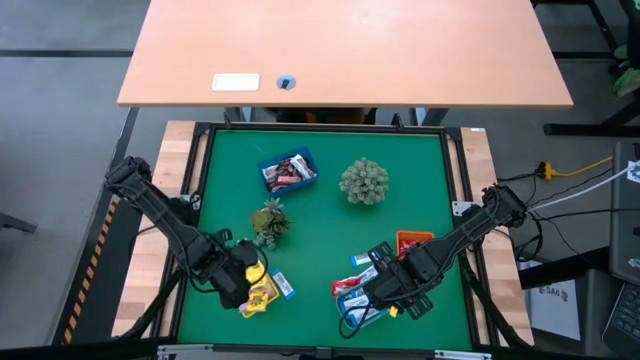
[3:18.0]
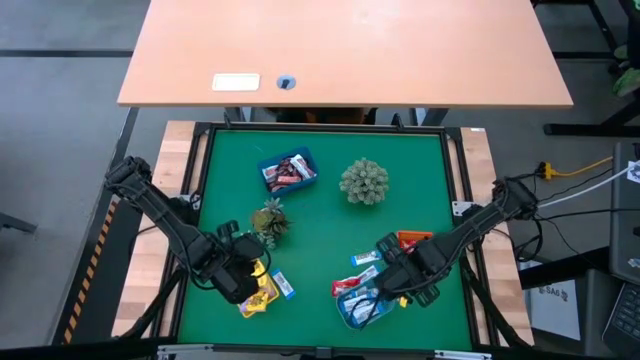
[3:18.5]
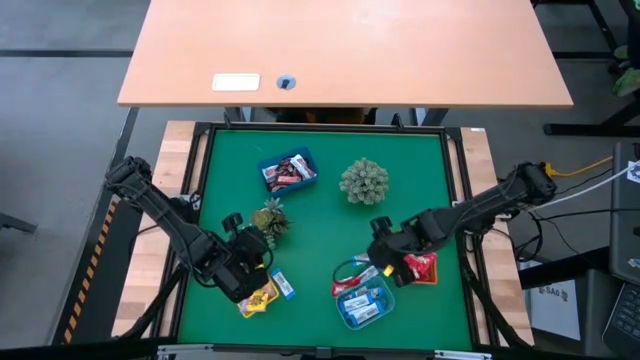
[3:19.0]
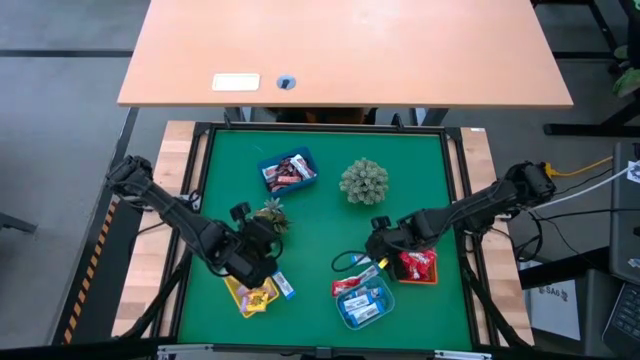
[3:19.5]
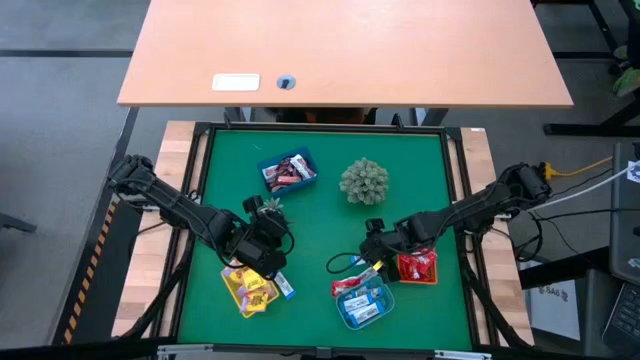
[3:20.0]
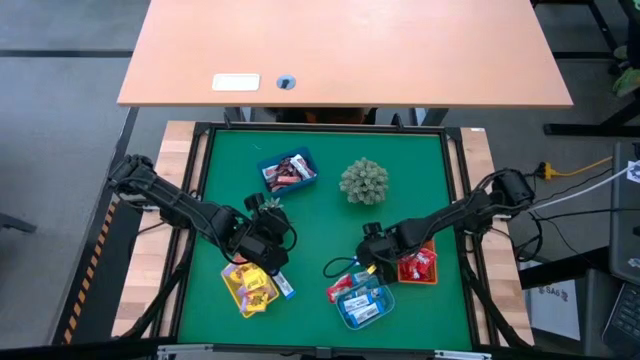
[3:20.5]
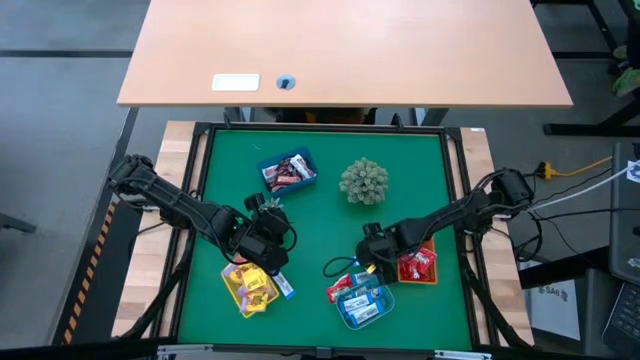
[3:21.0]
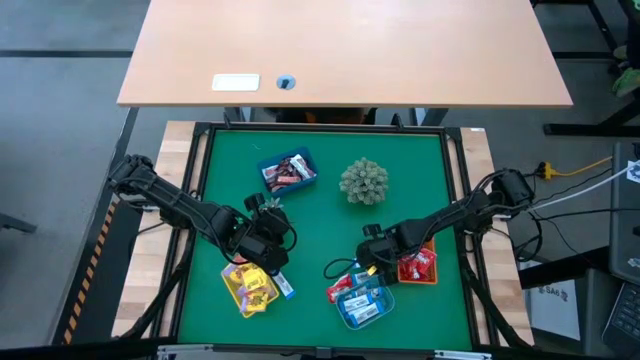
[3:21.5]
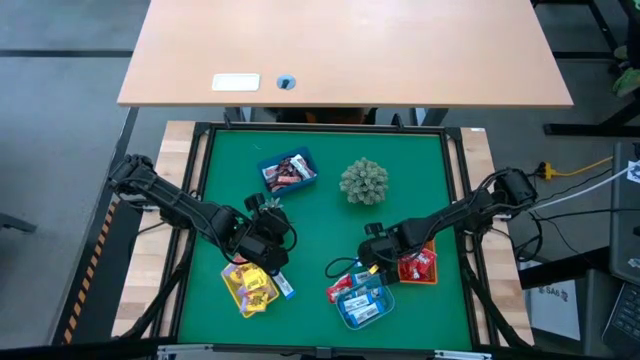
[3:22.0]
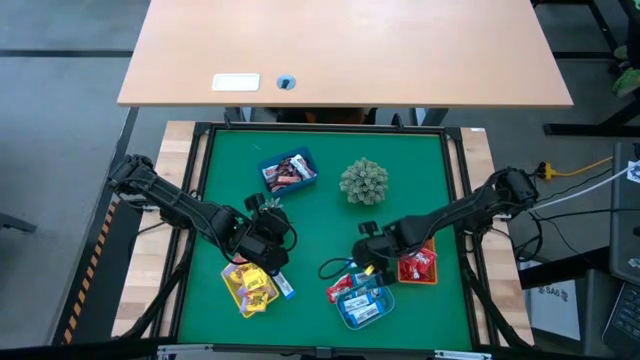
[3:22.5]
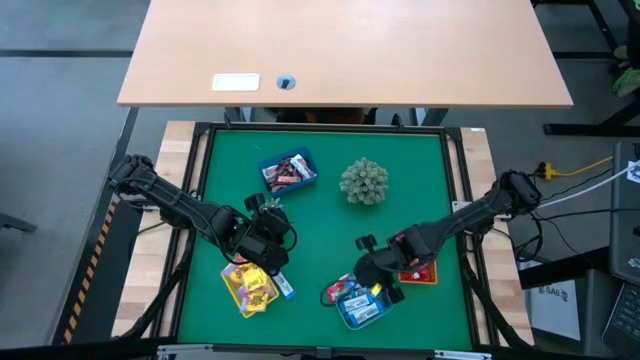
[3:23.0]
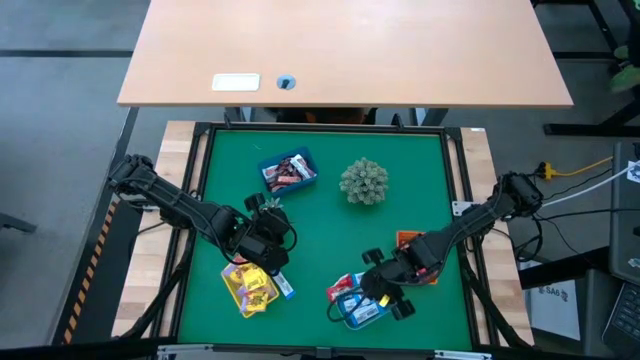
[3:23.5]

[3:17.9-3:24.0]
Task: Sort candy
Put the white-blue chocolate into the light blue bin

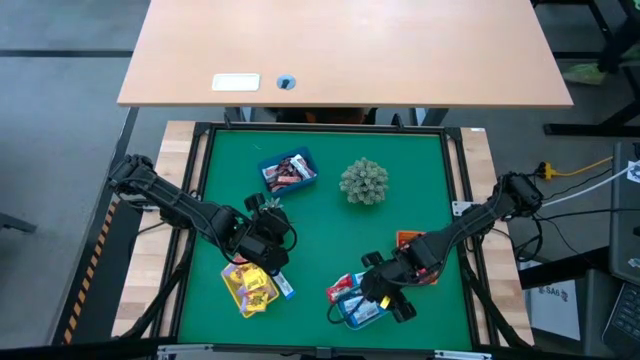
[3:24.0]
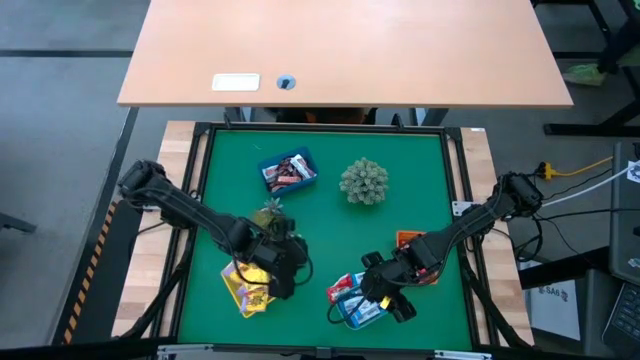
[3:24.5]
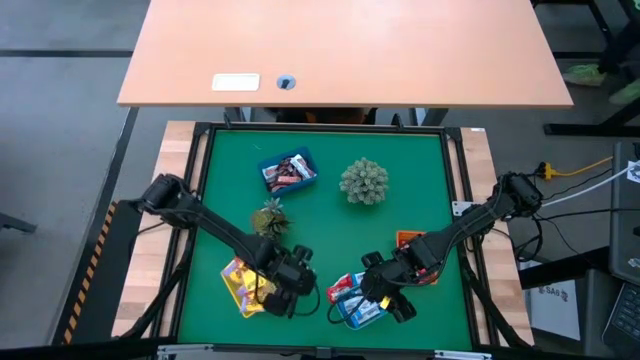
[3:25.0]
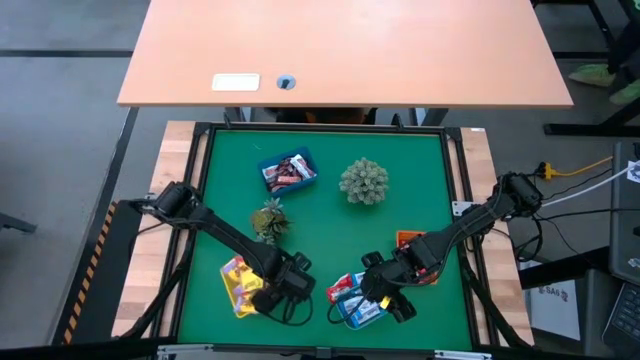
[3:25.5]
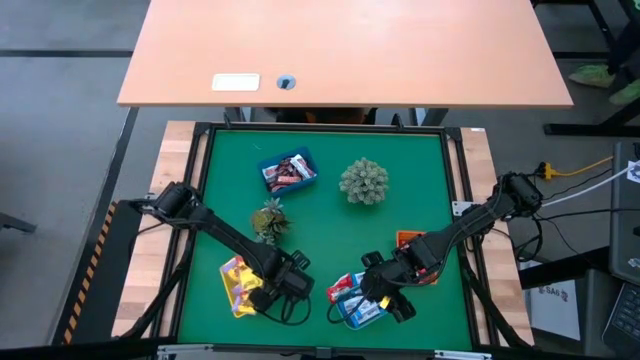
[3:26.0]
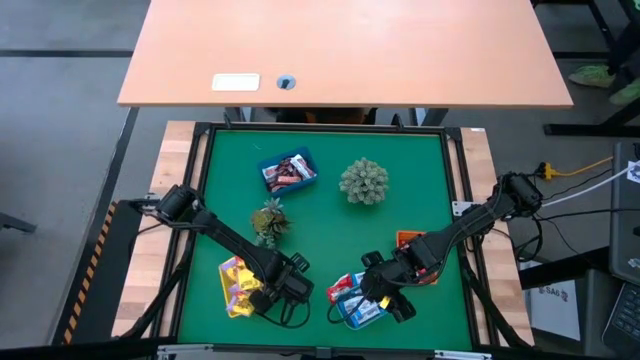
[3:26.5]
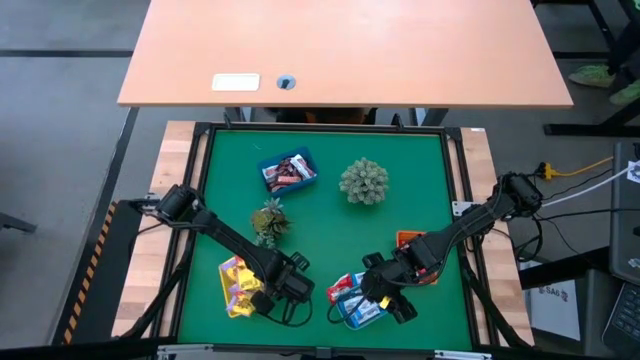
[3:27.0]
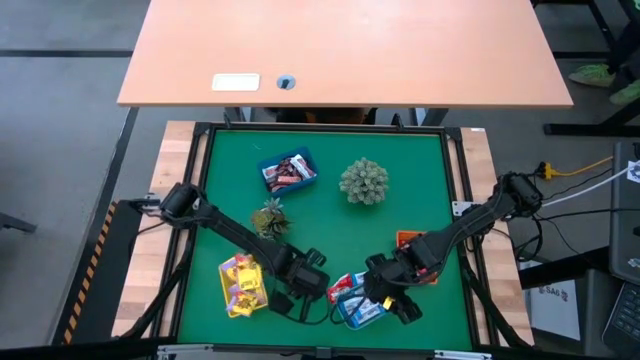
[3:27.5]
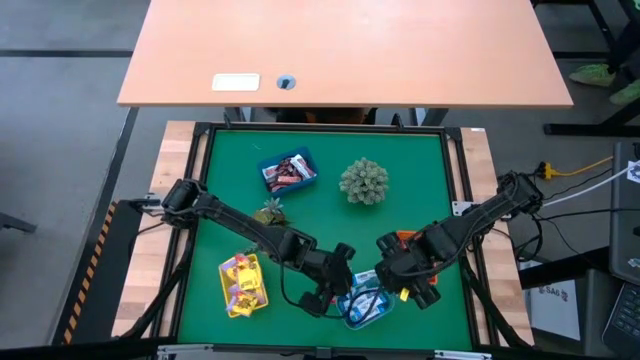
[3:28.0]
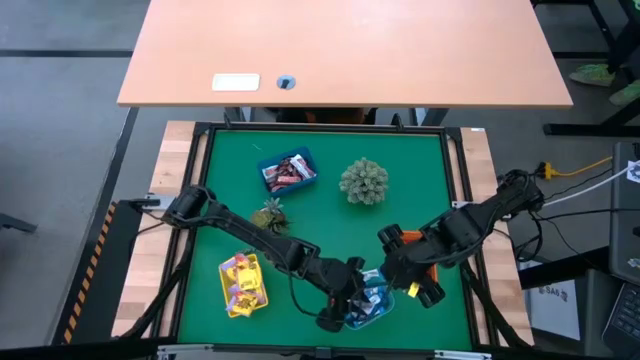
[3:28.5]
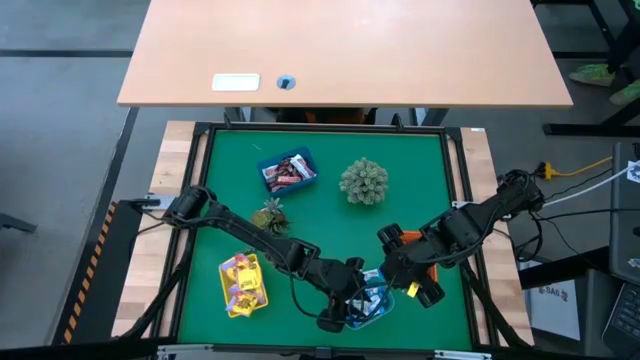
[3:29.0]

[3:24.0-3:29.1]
Put the white-blue chocolate into the light blue bin

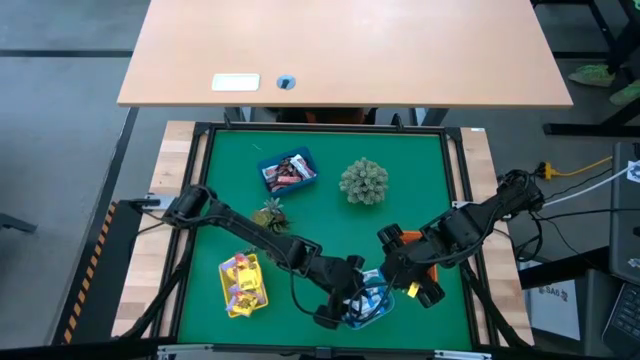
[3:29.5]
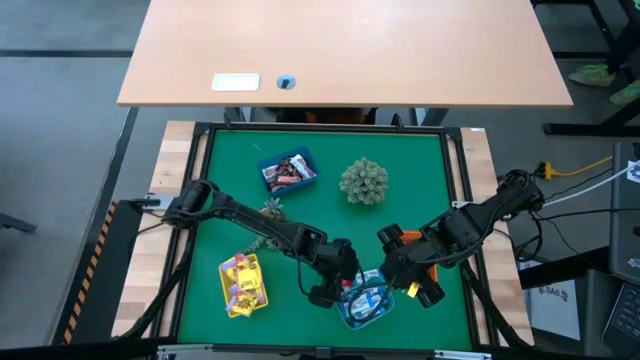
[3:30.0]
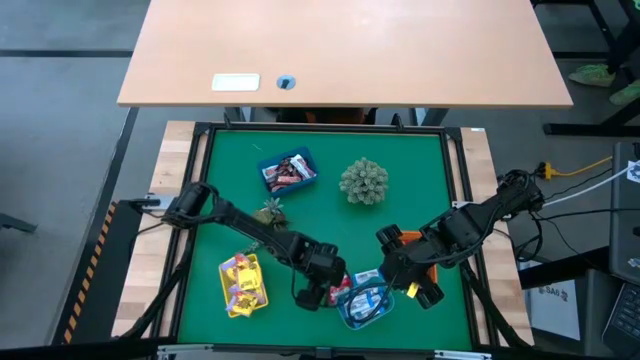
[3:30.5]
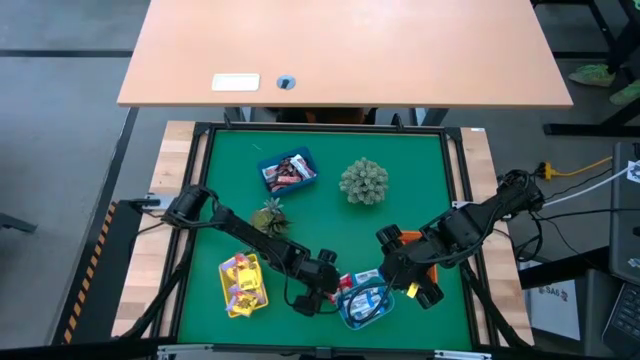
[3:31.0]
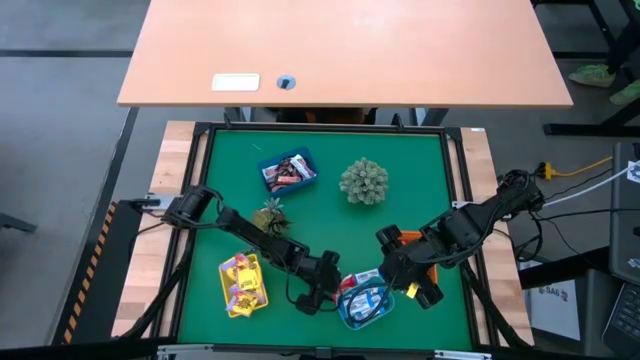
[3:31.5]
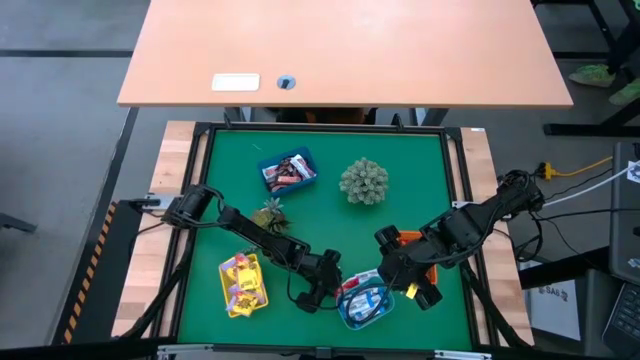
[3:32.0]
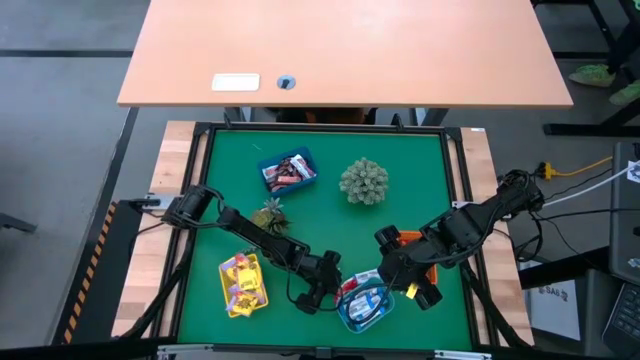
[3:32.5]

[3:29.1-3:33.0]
Put the red candy into the orange bin

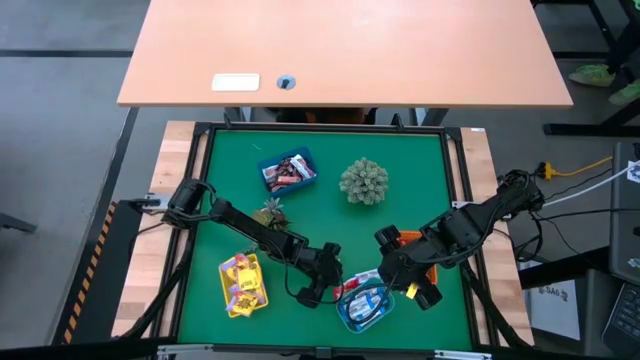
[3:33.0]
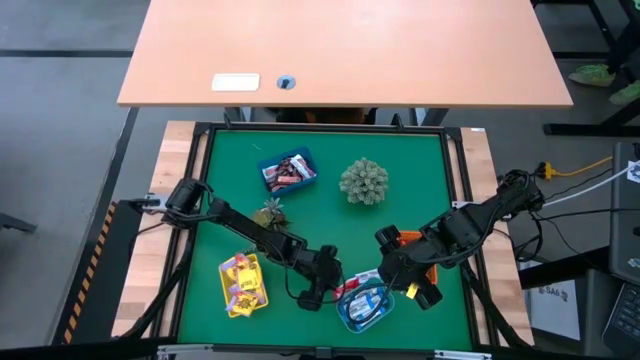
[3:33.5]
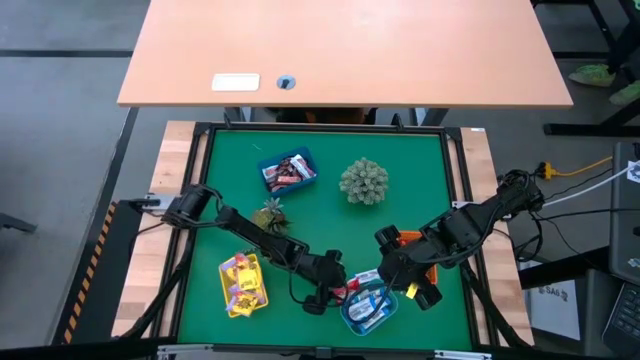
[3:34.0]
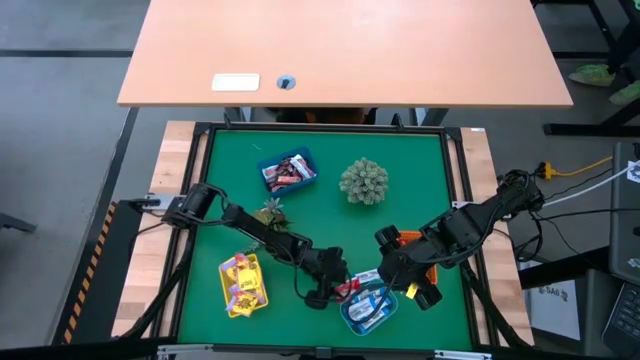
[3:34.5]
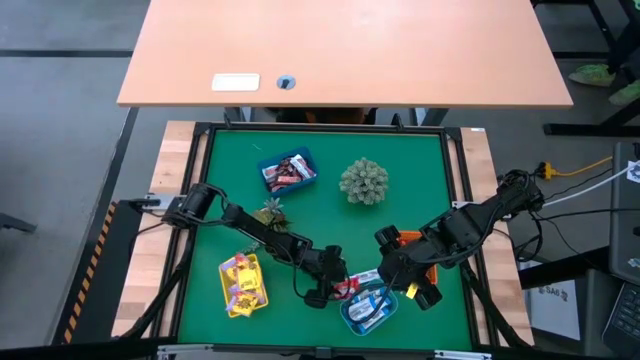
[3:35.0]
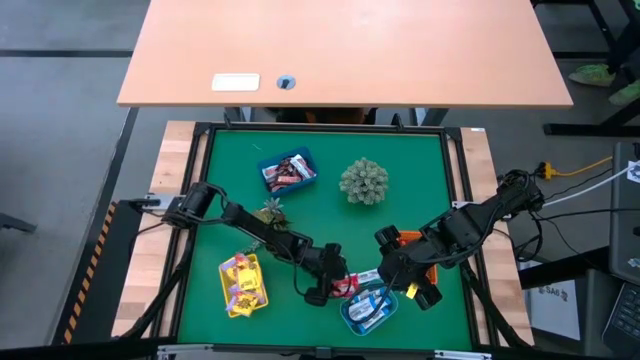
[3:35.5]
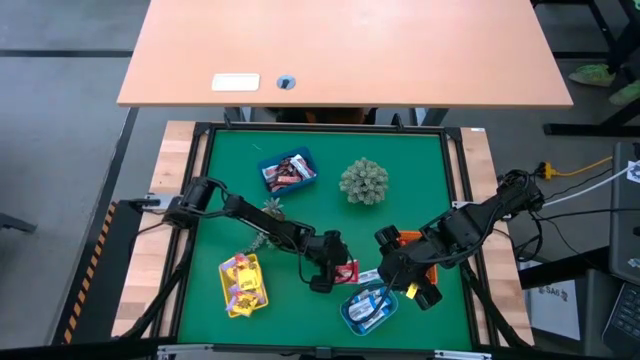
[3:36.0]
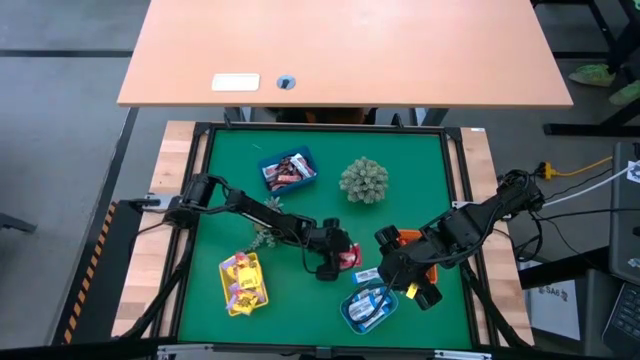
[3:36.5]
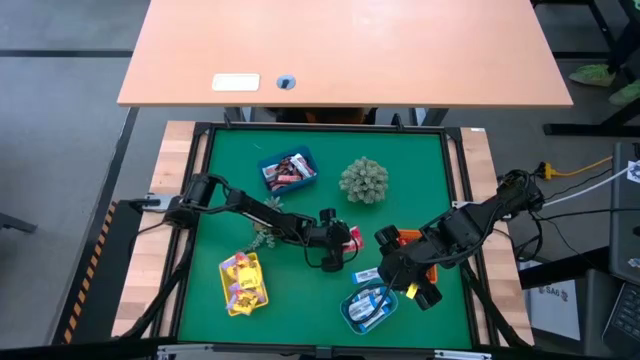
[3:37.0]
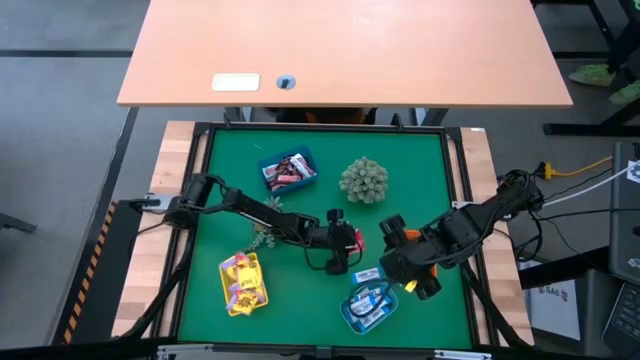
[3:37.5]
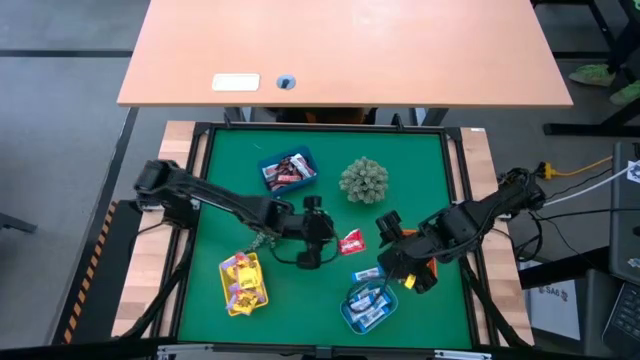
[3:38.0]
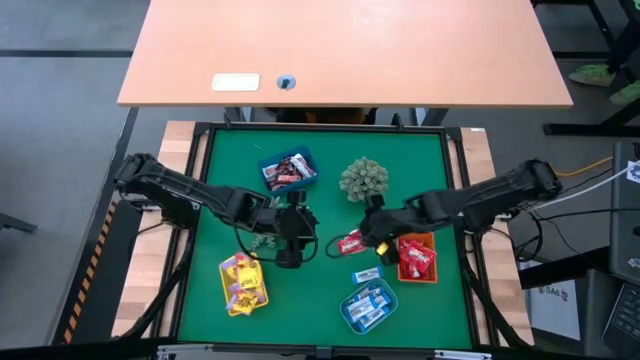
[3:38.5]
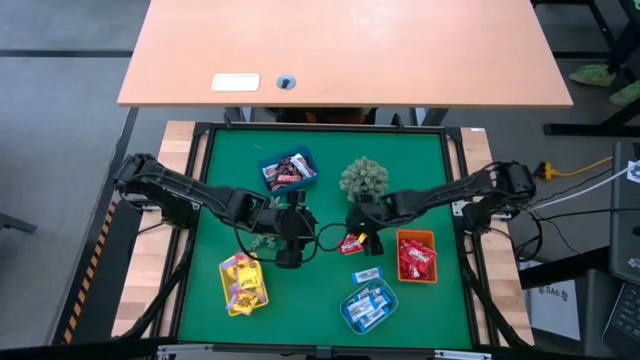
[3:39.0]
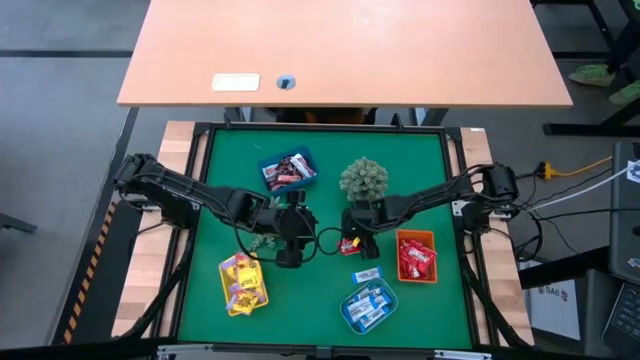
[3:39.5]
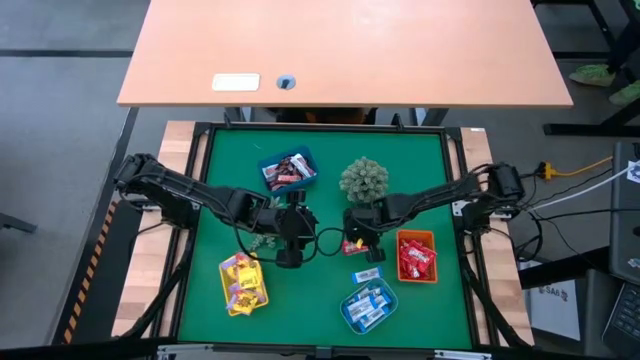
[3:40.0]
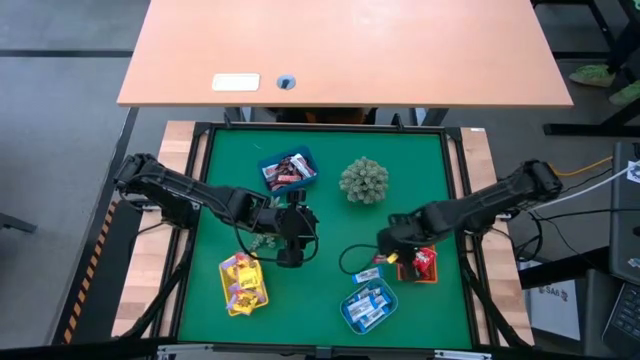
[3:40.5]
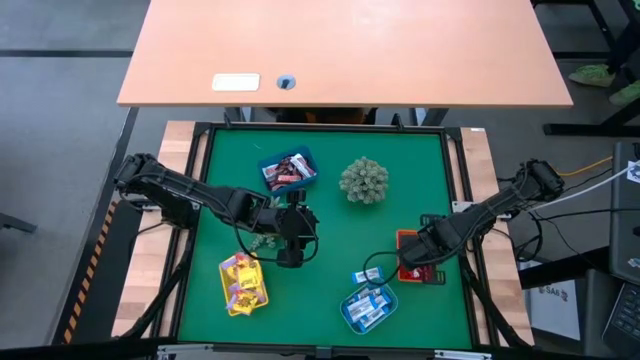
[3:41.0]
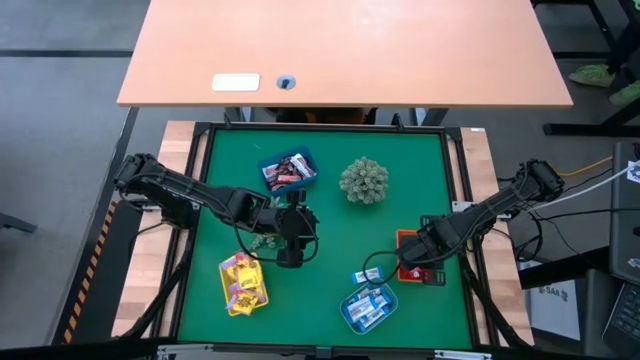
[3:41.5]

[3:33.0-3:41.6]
Put the red candy into the orange bin
